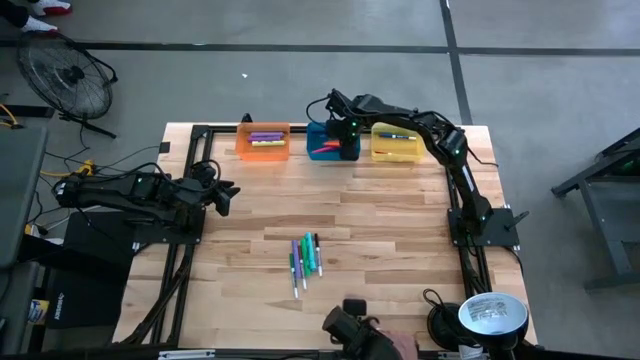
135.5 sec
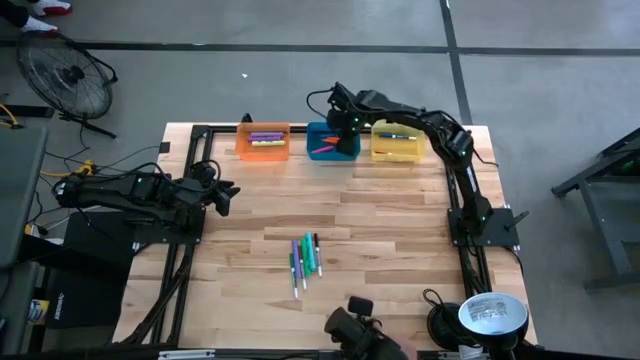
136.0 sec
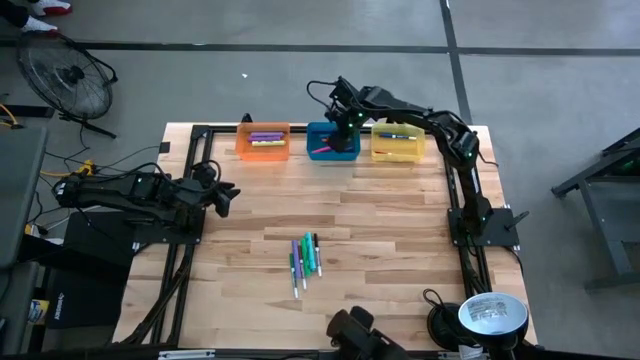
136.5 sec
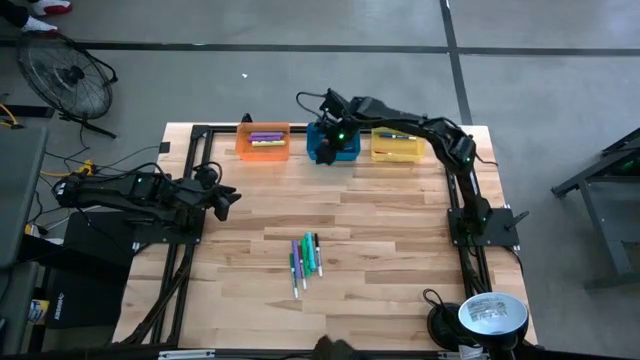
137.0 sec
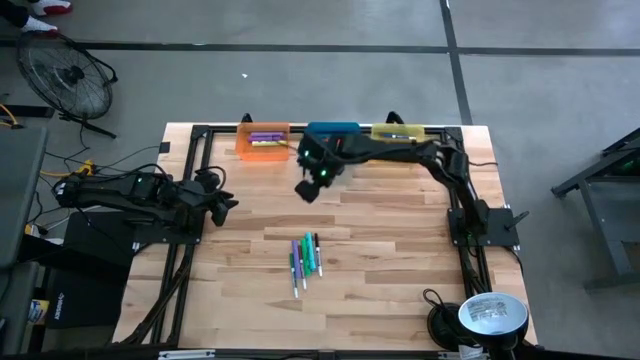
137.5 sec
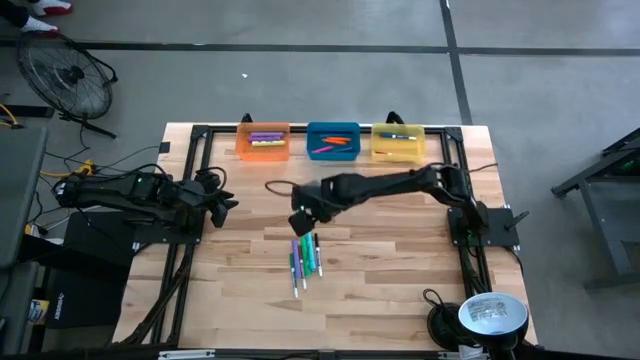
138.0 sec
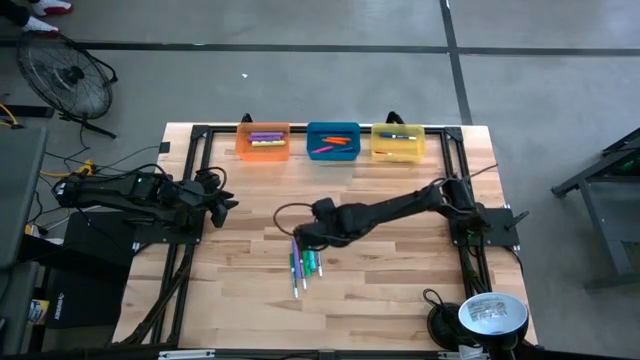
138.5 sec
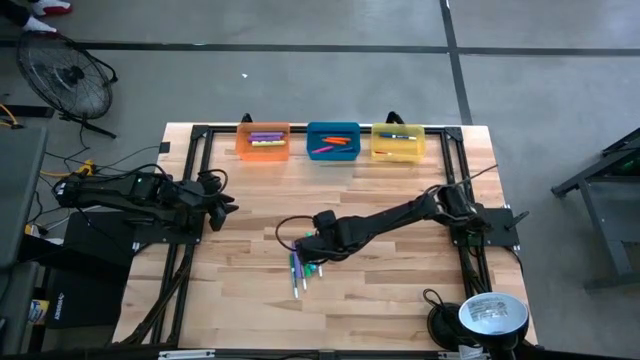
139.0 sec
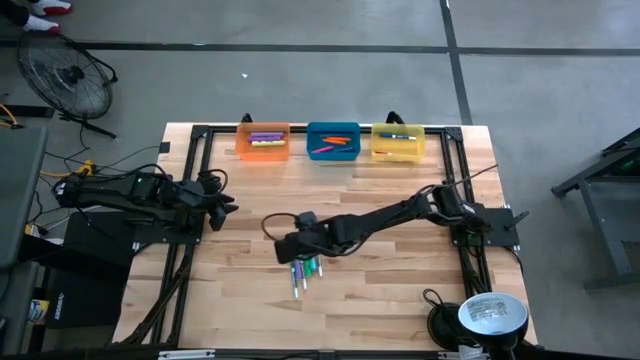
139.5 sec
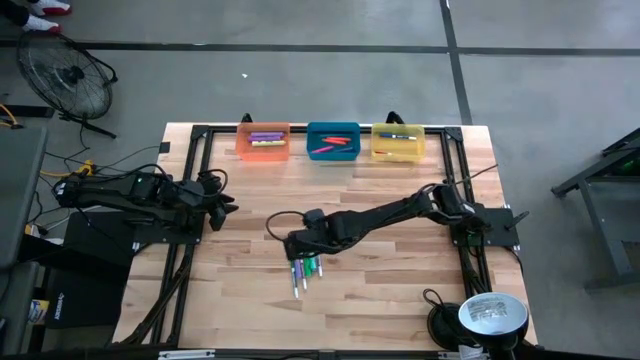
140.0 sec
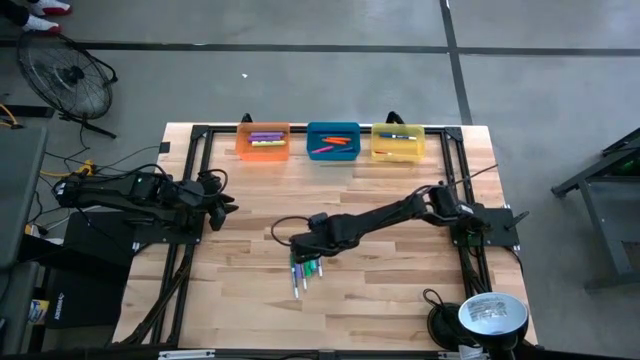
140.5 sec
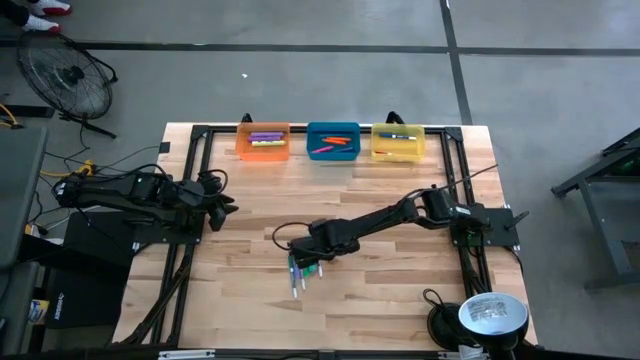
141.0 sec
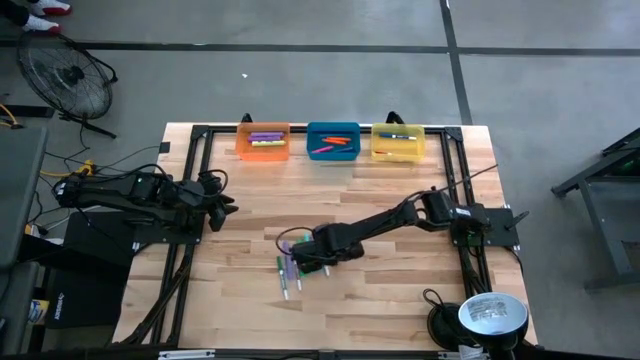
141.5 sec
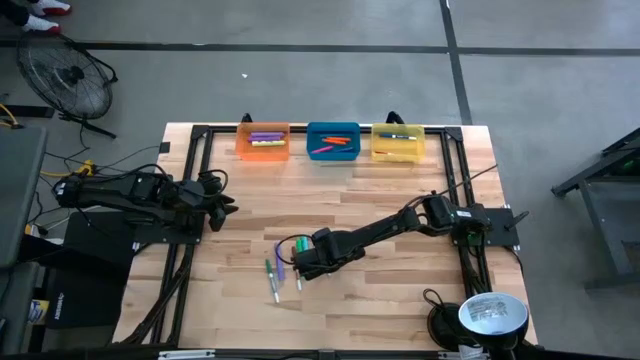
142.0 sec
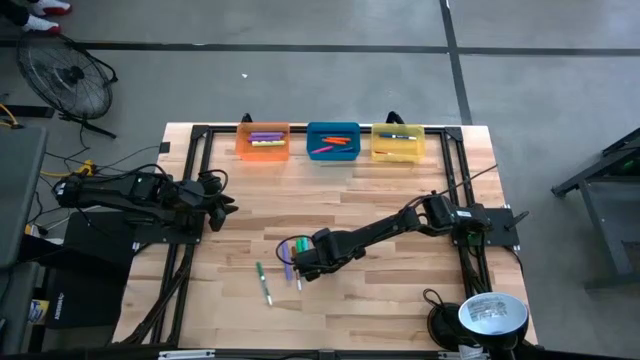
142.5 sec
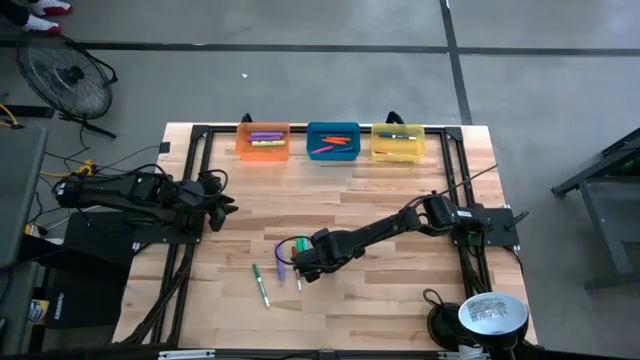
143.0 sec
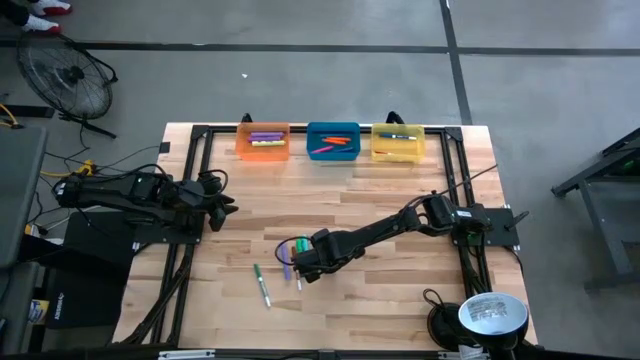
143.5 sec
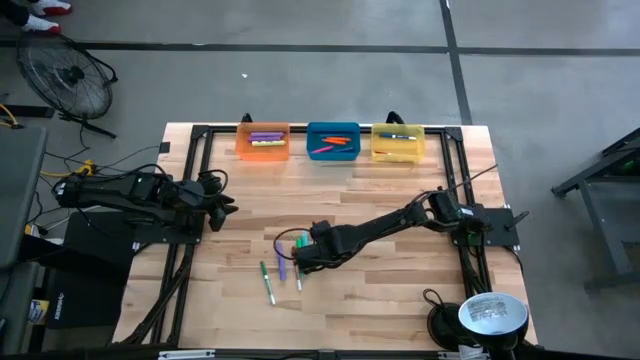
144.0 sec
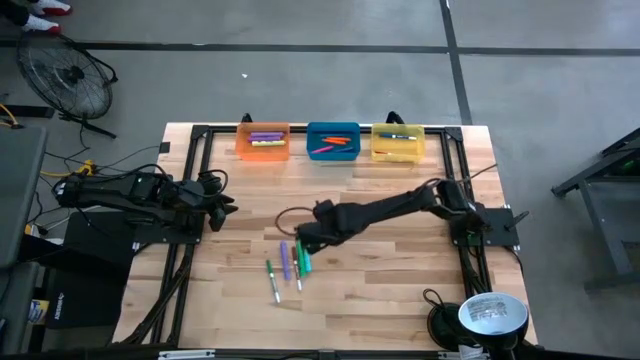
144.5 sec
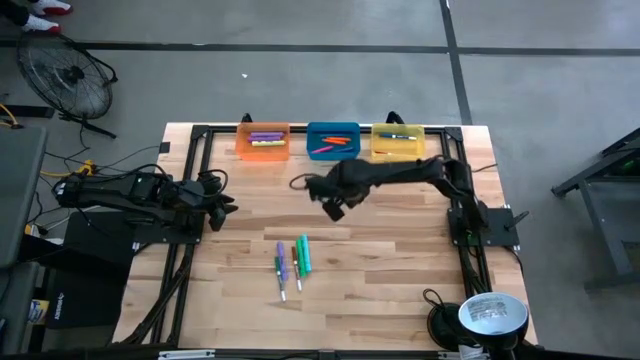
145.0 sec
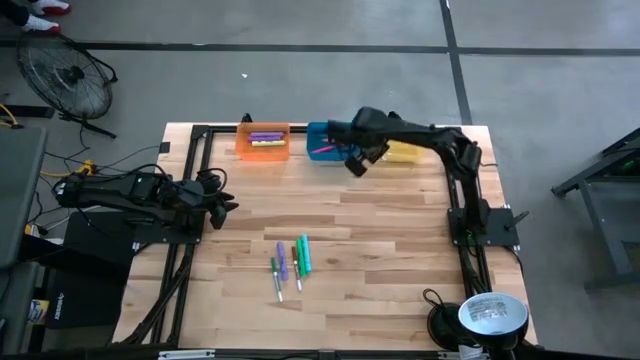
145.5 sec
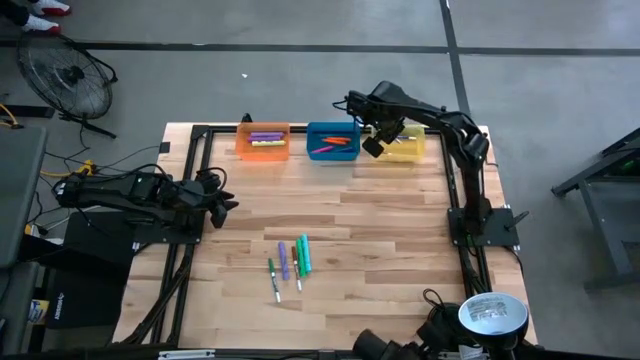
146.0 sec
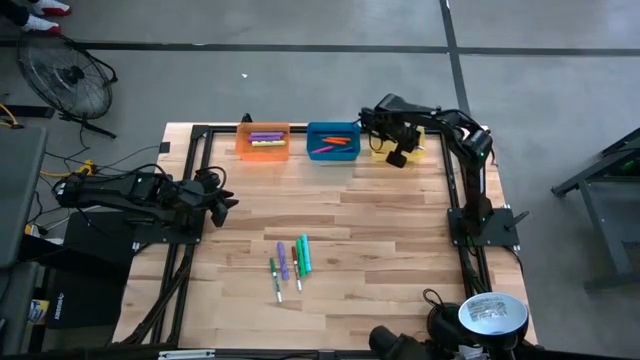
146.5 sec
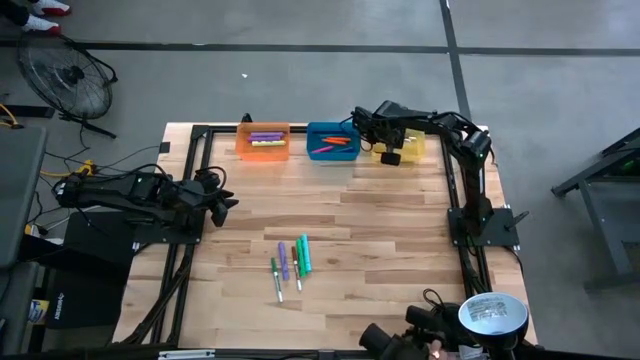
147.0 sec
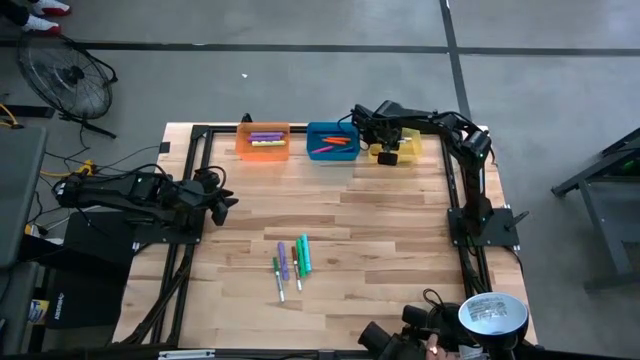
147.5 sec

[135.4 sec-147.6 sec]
Task: Pick & Place Markers
Put the black marker into the yellow bin

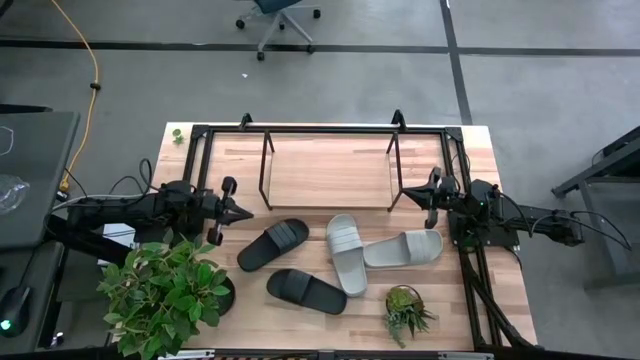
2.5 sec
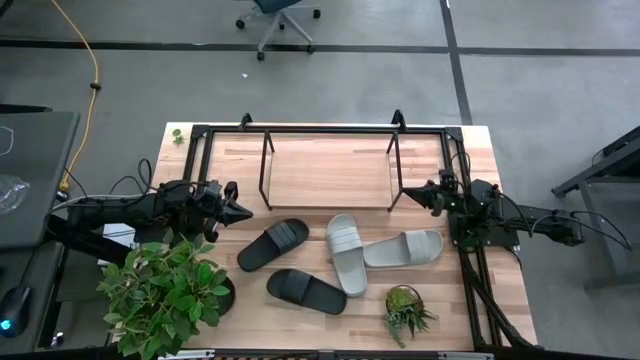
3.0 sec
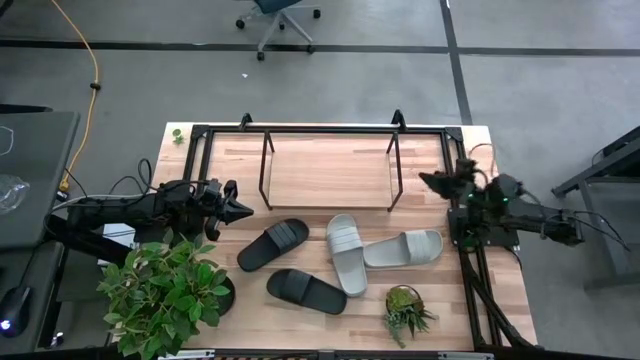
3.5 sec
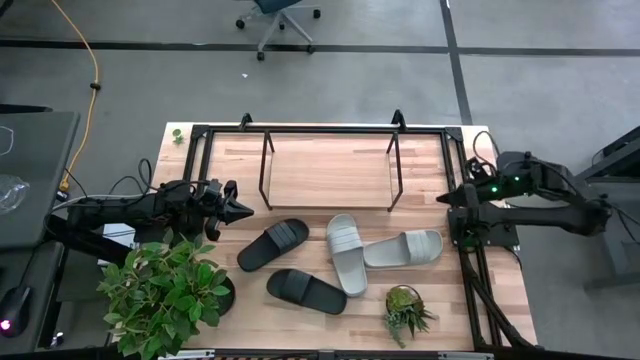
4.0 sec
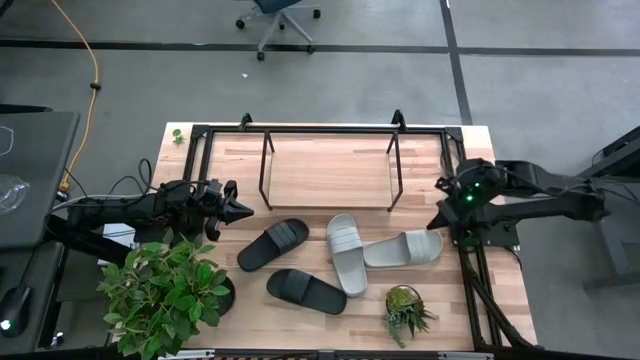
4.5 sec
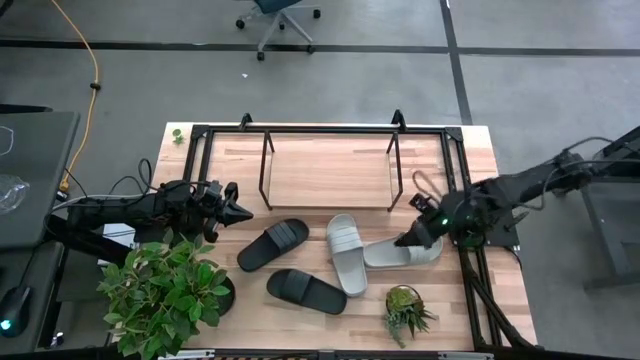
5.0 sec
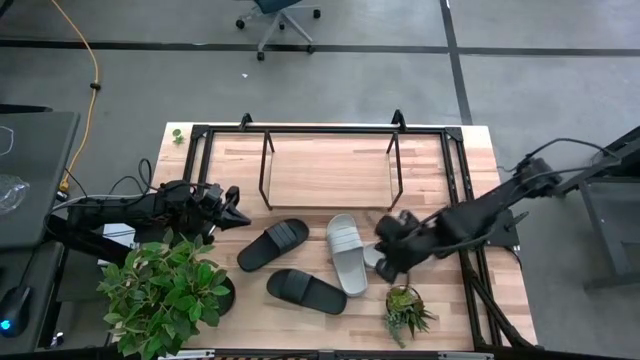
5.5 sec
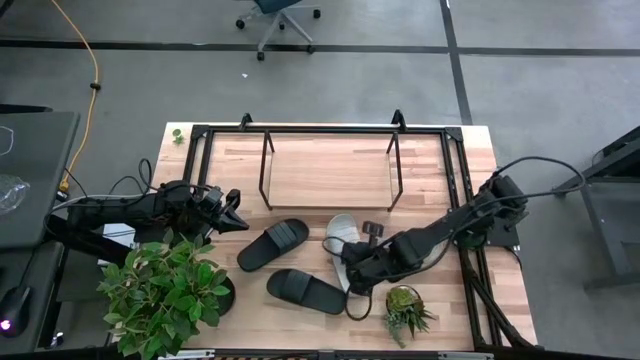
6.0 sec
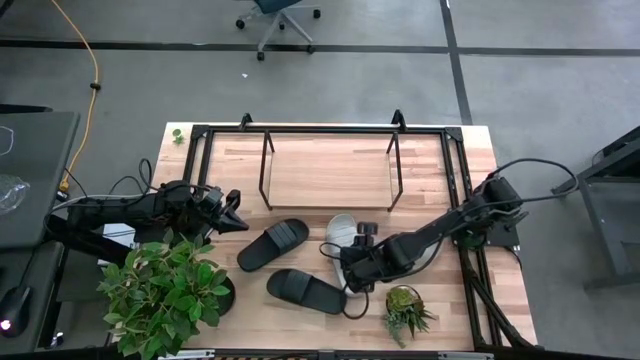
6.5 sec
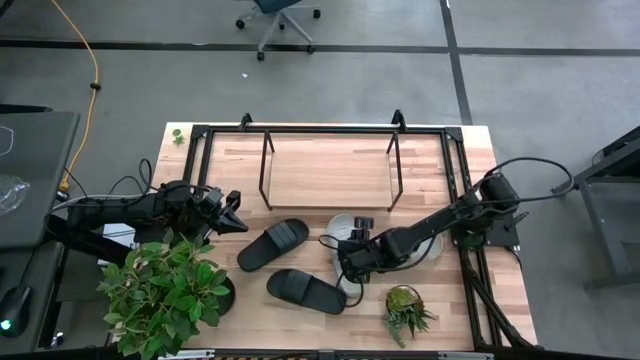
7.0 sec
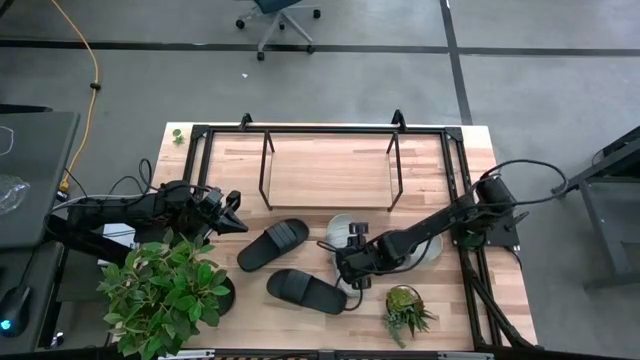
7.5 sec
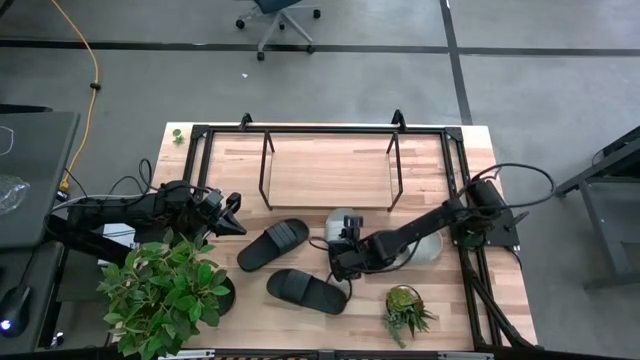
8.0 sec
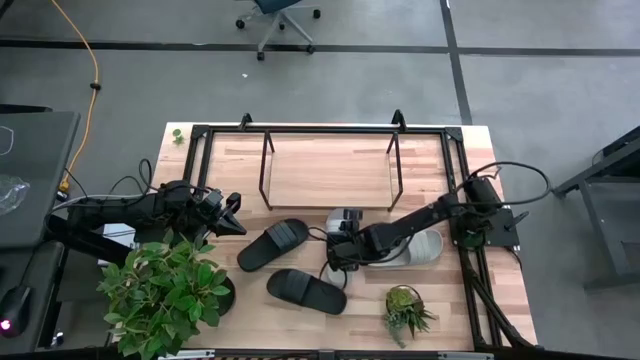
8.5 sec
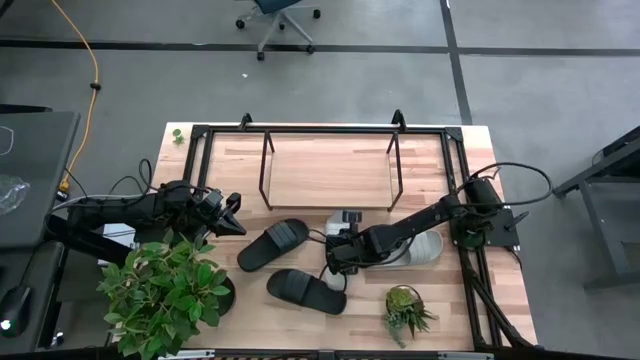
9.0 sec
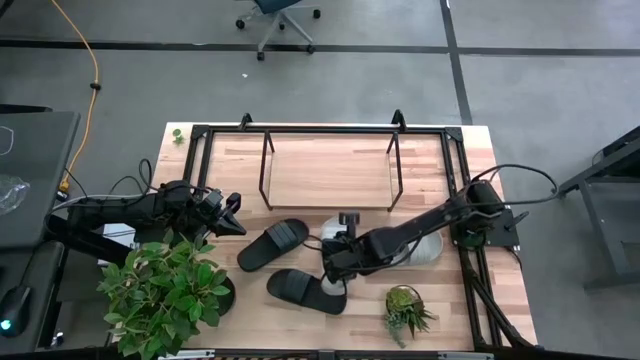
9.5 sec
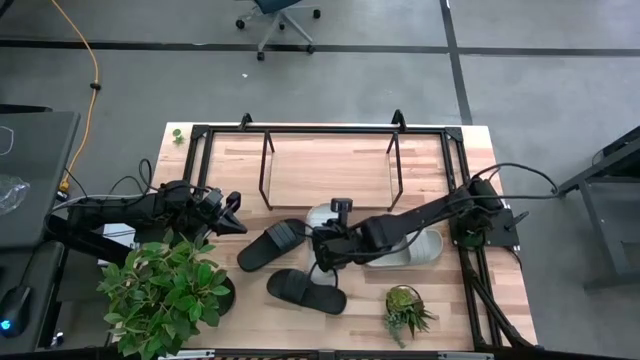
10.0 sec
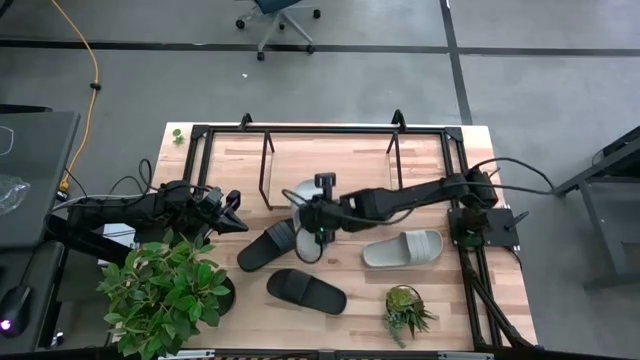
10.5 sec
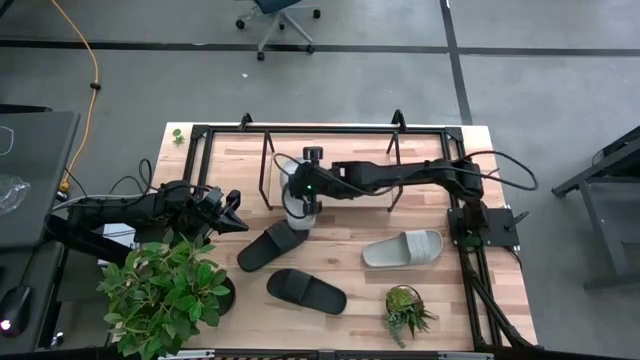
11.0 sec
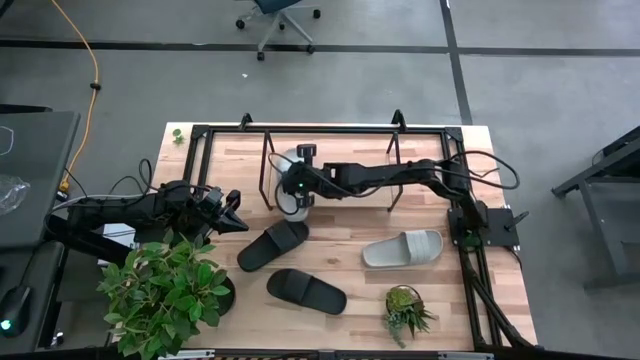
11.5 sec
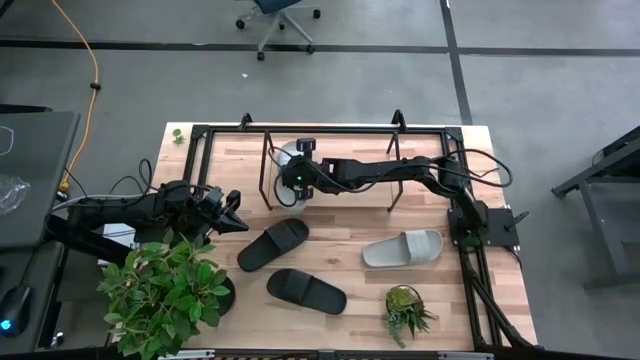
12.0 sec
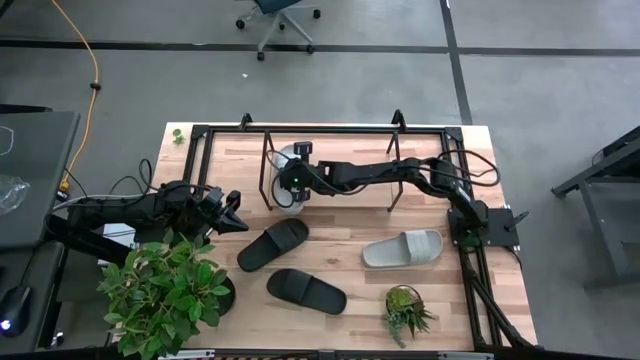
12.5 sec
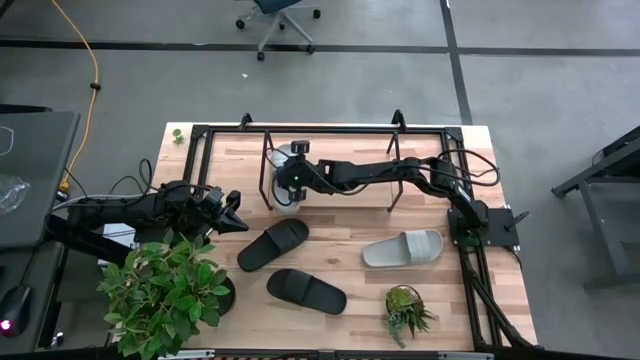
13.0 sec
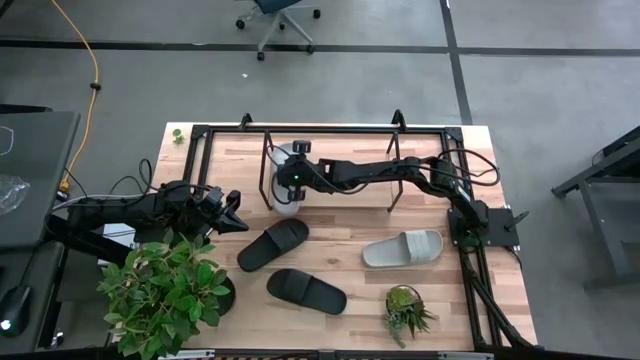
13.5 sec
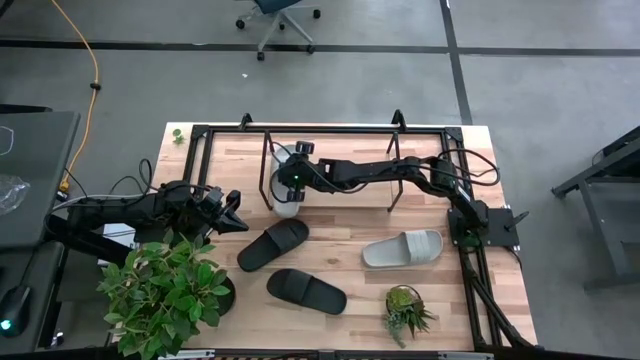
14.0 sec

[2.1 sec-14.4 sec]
Task: Pick and place slides into the shelf
Put the left gray slide on the shelf
